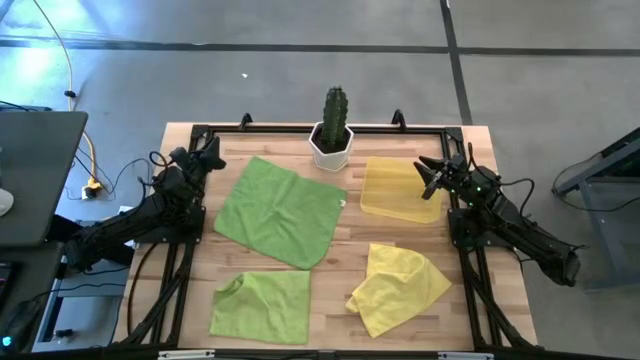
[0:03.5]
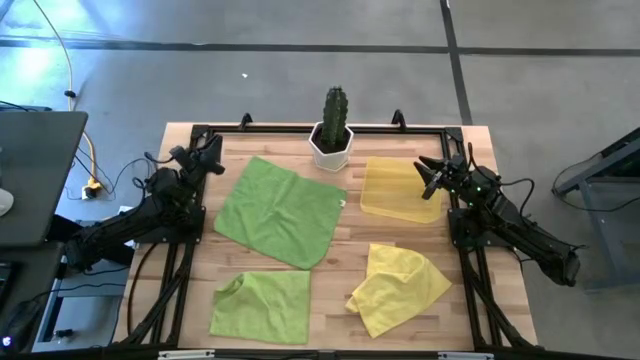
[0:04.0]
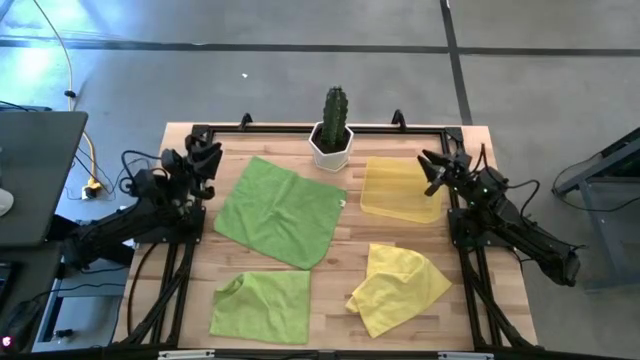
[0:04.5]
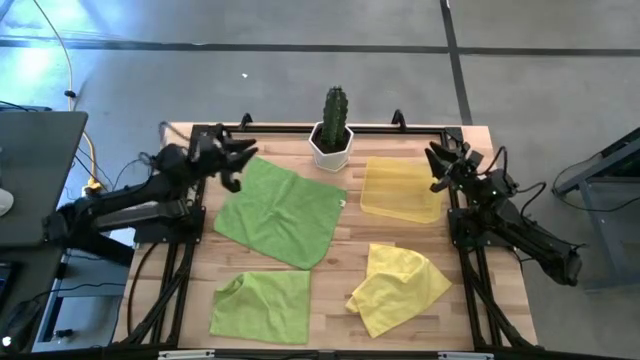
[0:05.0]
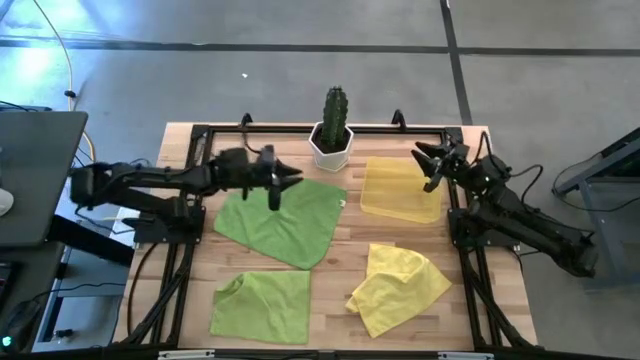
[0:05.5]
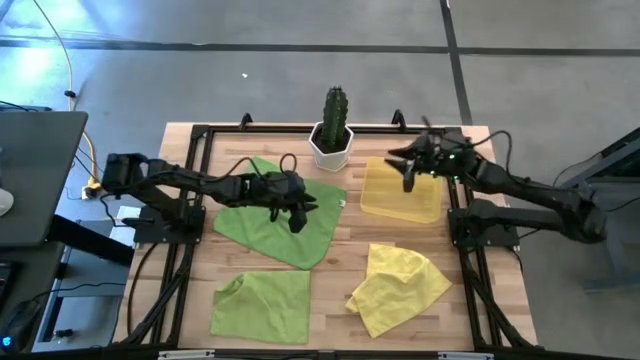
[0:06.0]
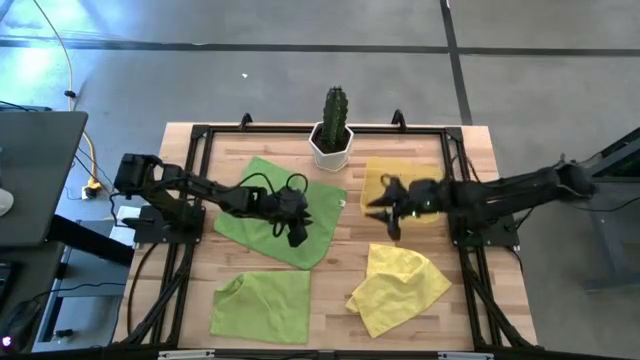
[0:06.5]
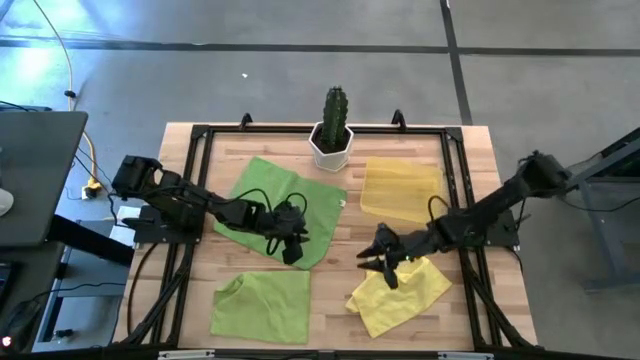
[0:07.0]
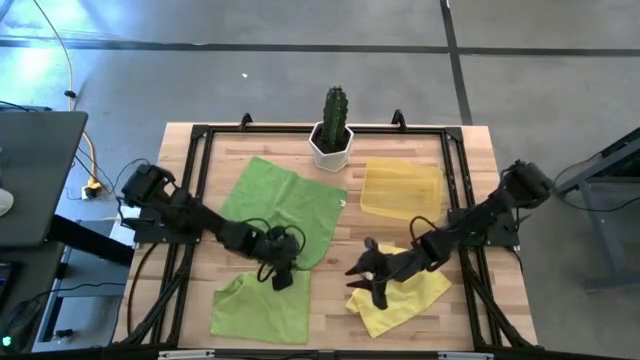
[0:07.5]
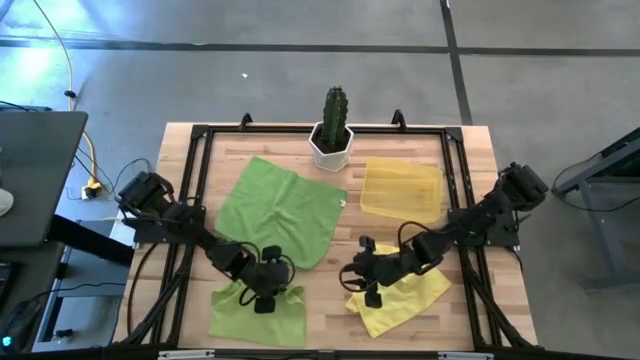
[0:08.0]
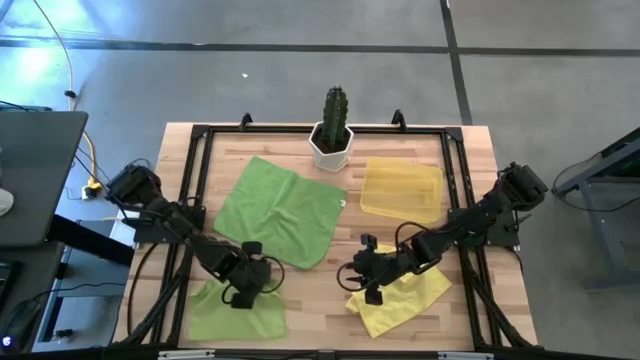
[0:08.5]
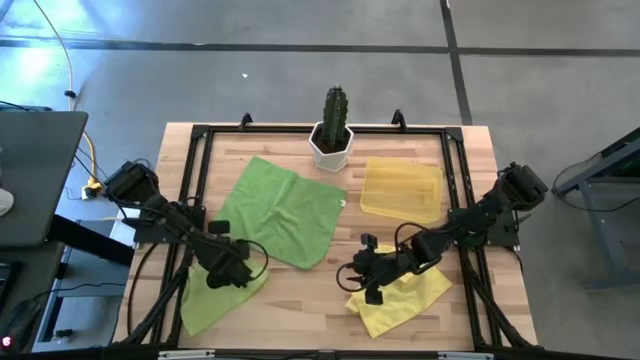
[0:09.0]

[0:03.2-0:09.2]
Task: Roll microfiber towels into tight, uniform cylinder then place into a basket
Adjust the light green towel

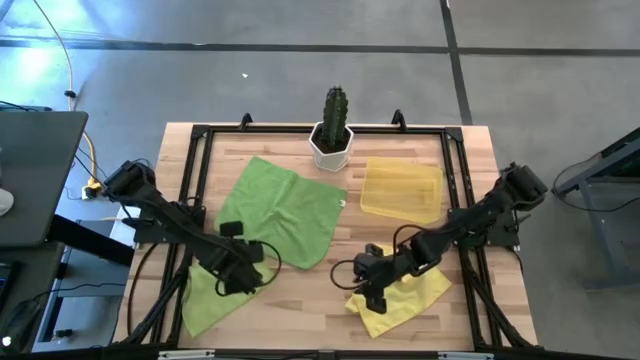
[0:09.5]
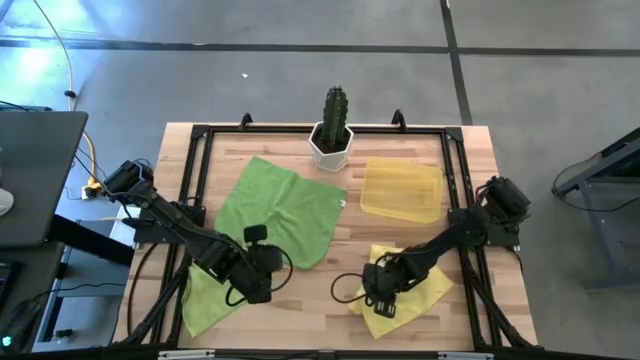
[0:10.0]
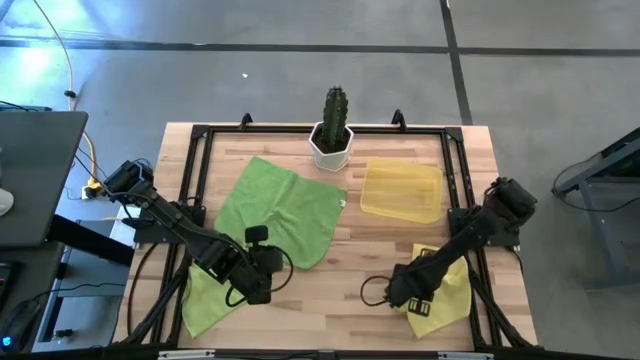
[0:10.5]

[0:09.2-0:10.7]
Adjust the yellow towel

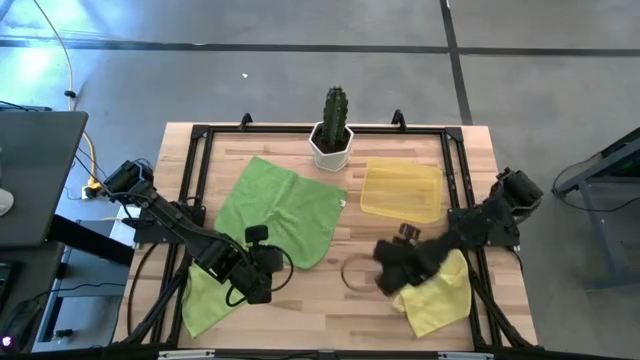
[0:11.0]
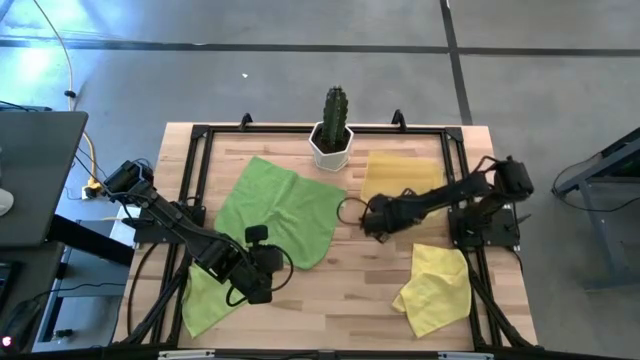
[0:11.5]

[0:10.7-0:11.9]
Adjust the yellow bin

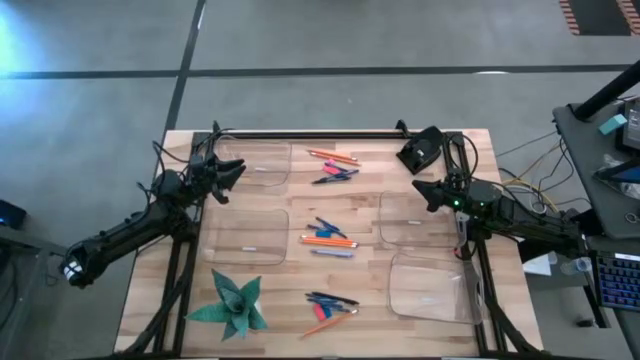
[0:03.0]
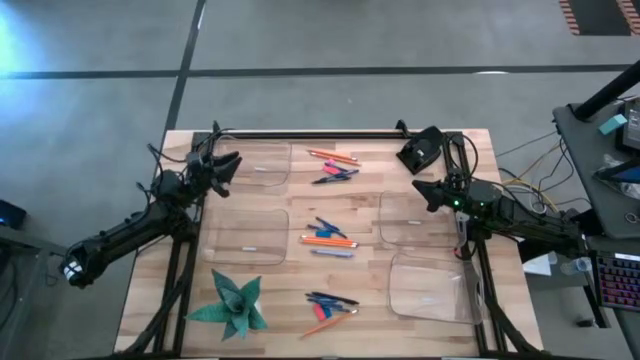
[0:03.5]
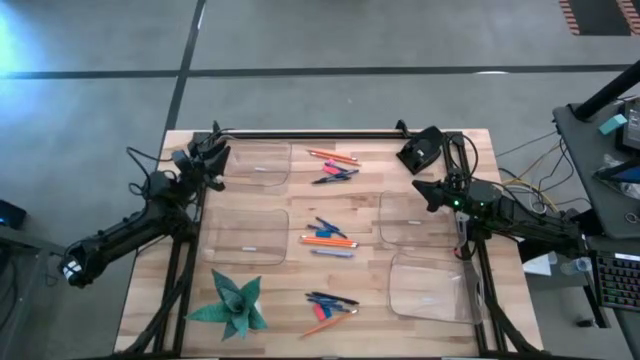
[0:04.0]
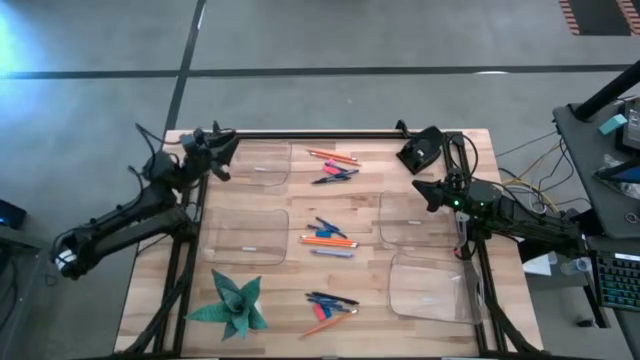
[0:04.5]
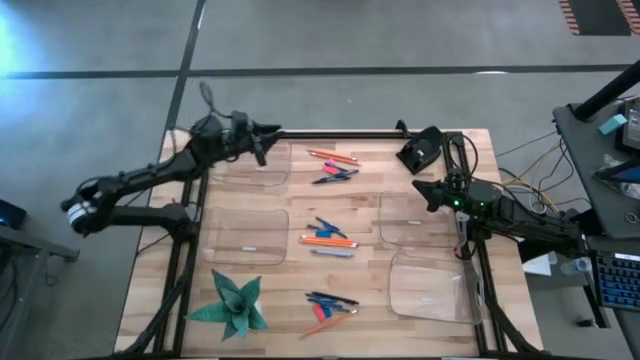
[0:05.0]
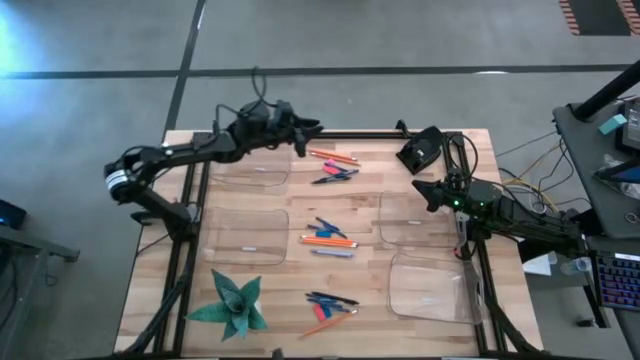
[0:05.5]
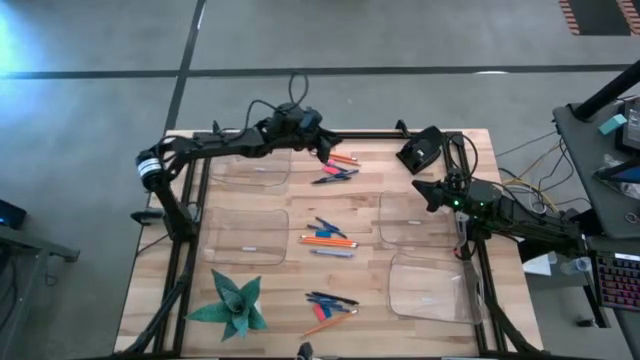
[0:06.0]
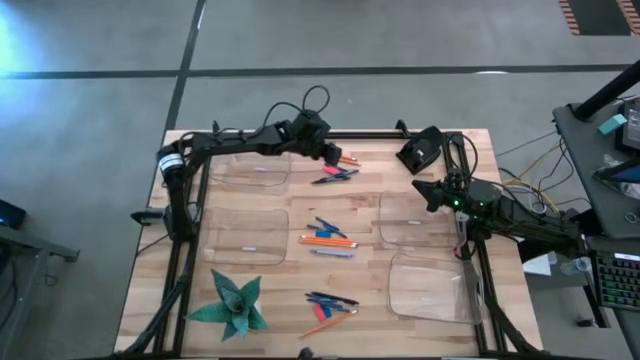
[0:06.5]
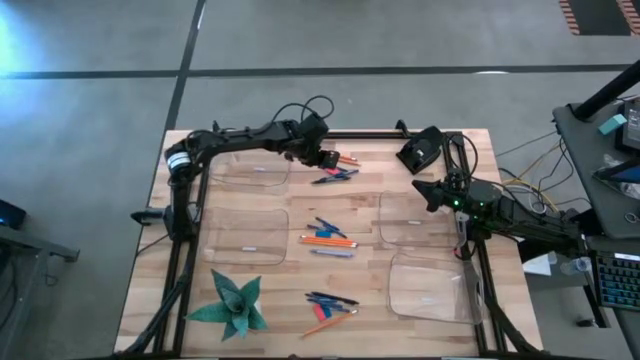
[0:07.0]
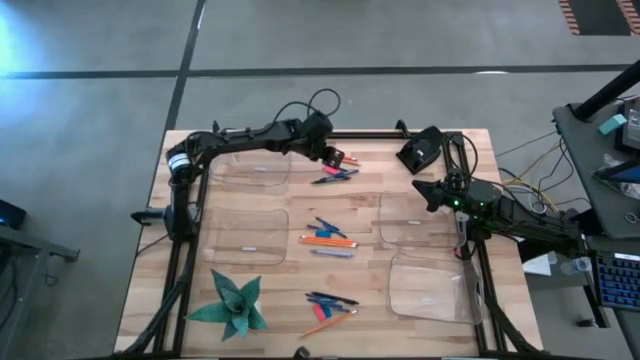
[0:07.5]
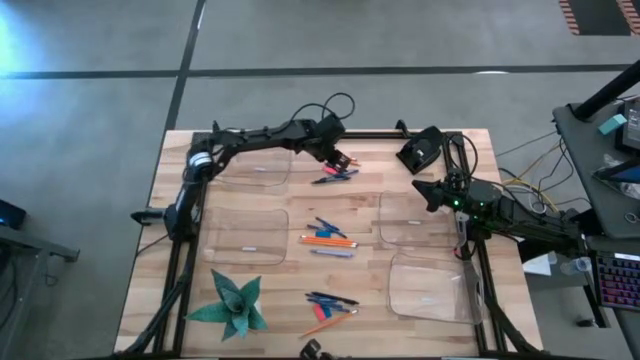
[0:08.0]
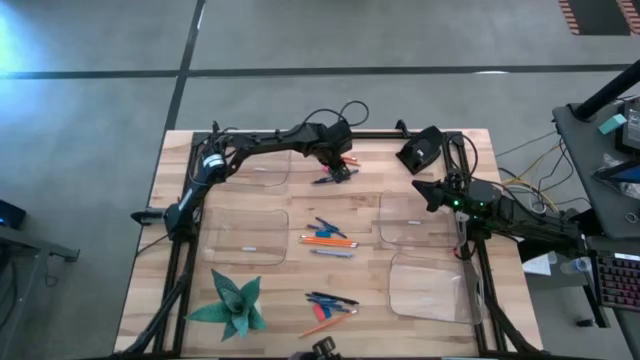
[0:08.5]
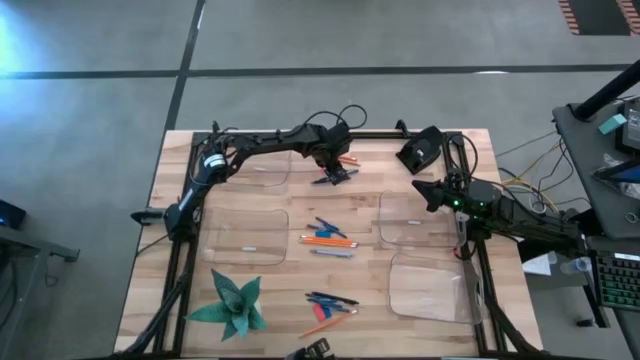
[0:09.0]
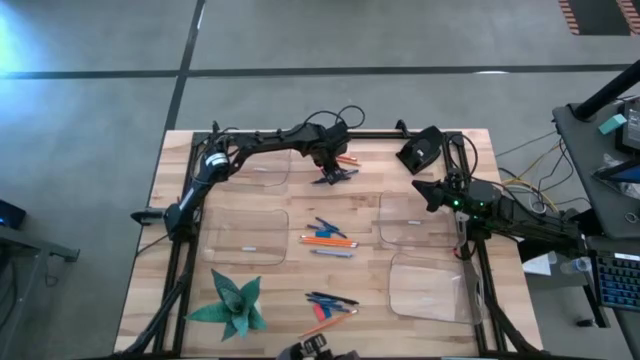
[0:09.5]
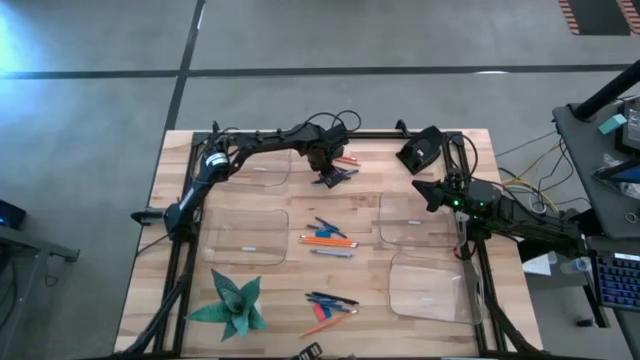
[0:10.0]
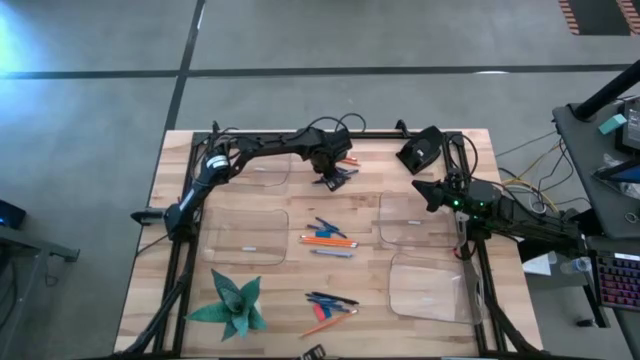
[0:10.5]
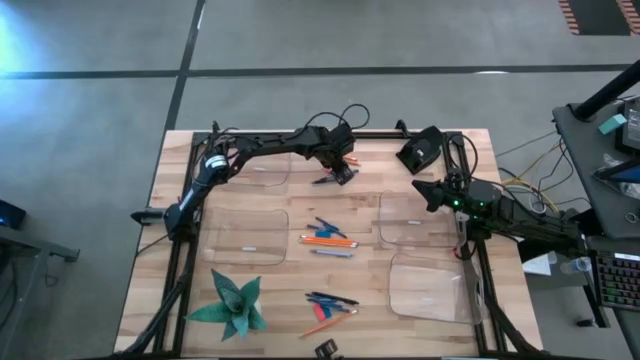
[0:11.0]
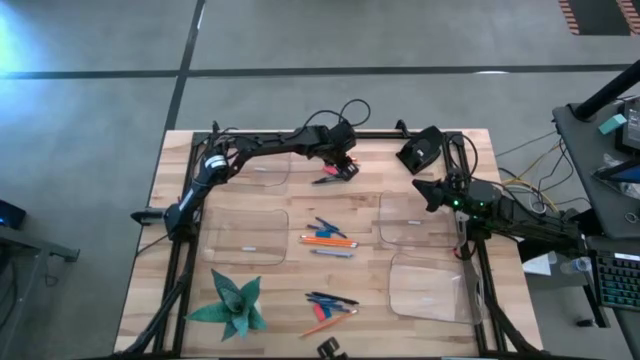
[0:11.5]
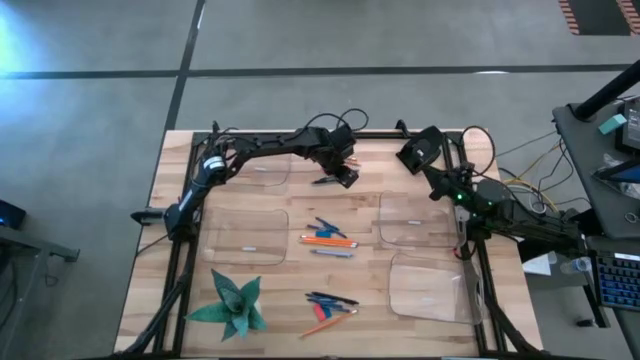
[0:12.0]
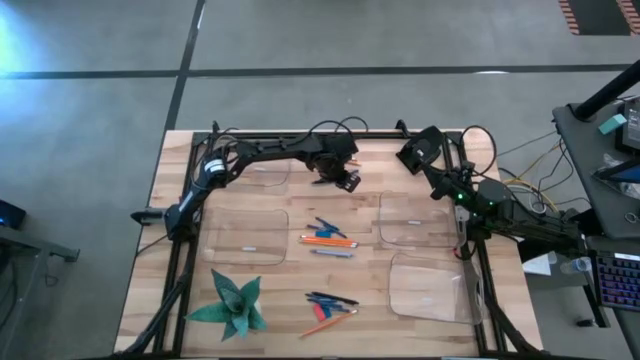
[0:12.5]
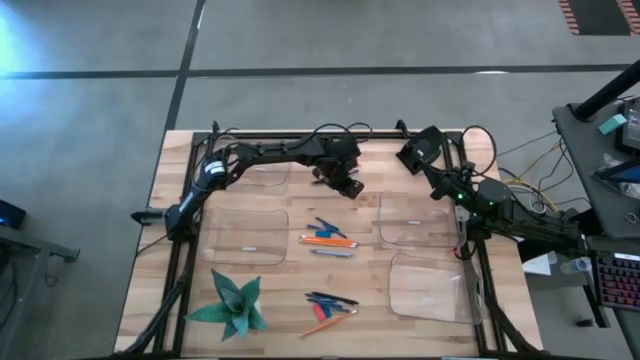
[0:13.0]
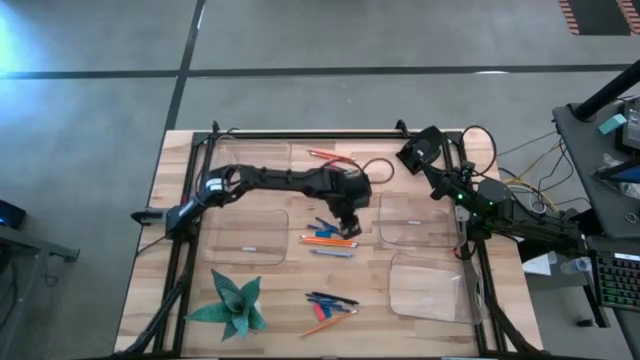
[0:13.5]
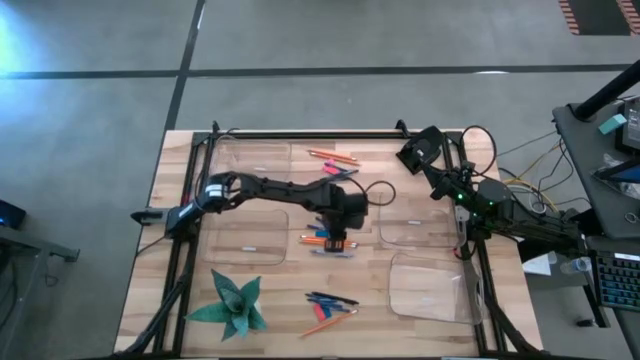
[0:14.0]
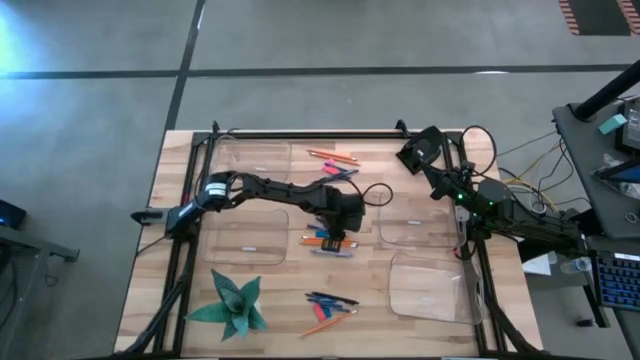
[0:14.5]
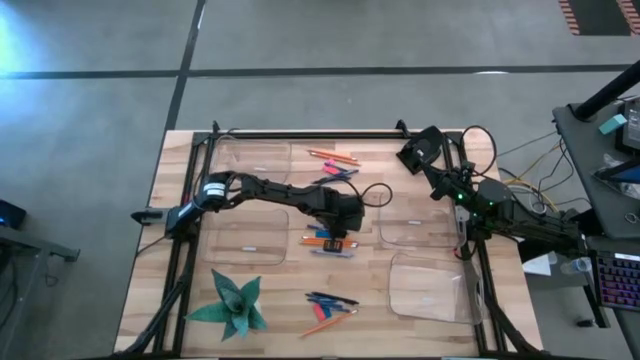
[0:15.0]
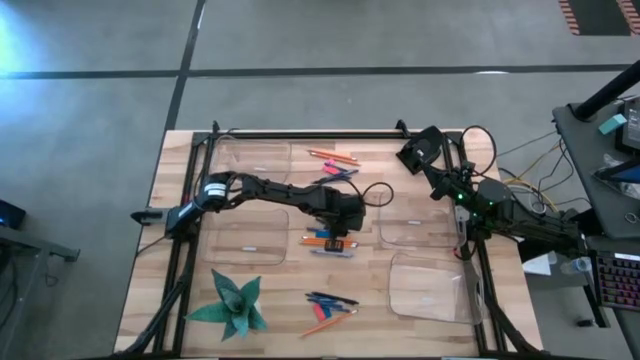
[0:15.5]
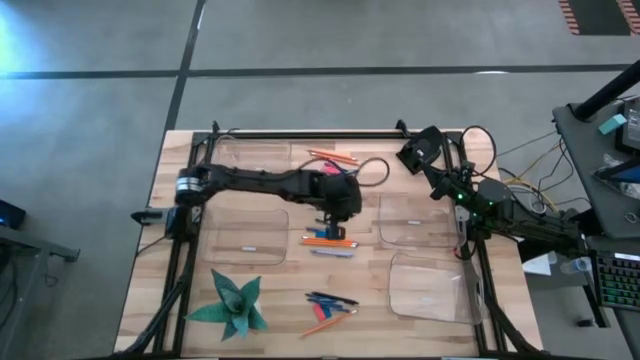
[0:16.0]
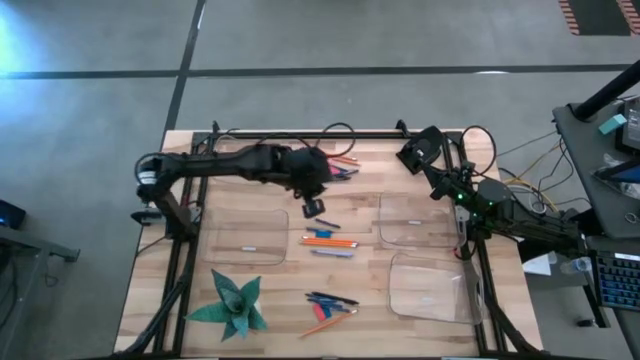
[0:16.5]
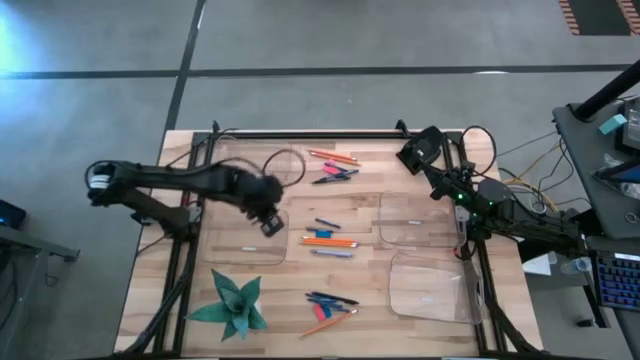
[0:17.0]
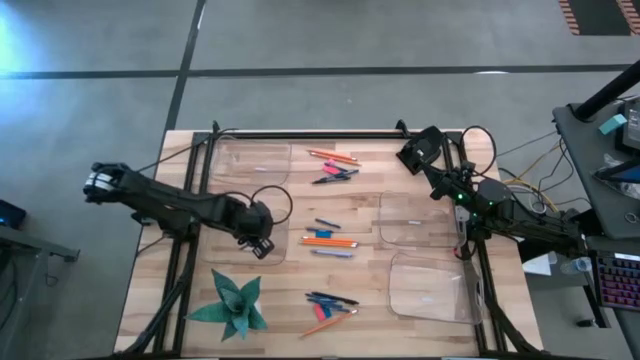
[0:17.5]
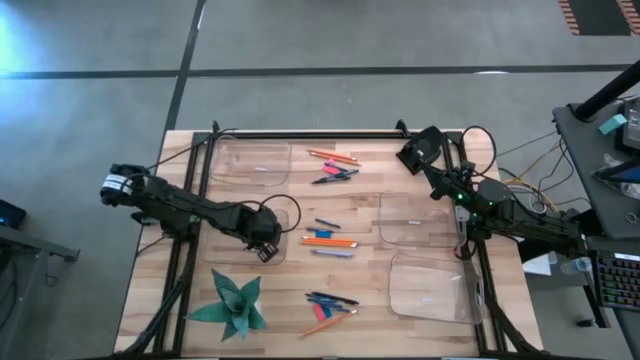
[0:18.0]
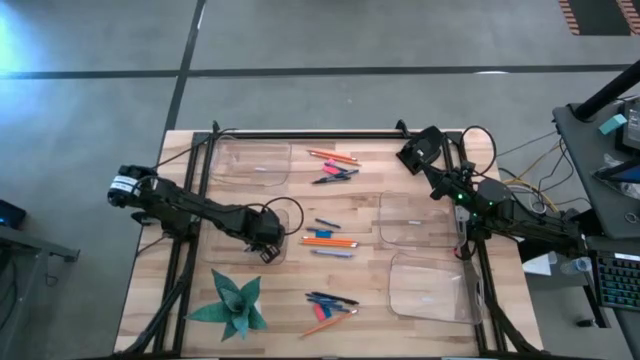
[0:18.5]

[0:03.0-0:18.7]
Task: Sort crayons/erasers/pens/pencils in bins
Put the blue crayon into the middle left transparent bin
